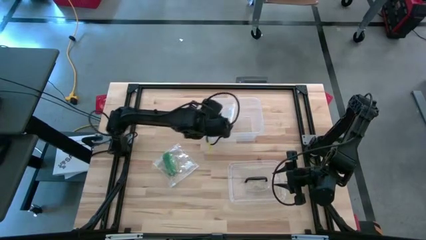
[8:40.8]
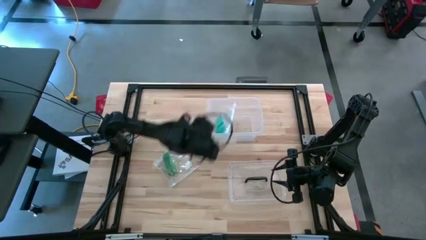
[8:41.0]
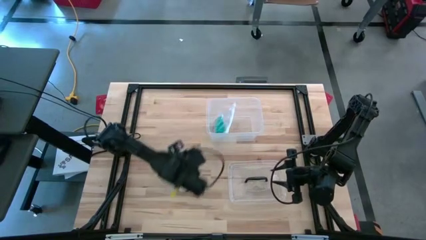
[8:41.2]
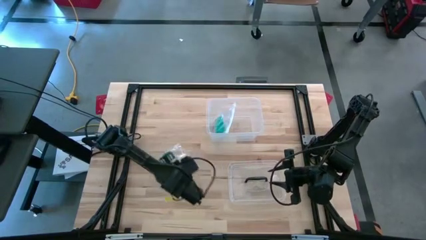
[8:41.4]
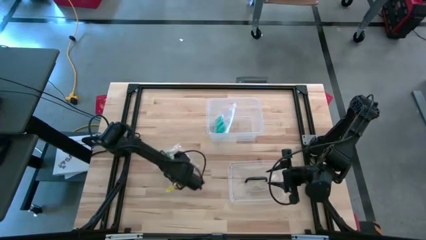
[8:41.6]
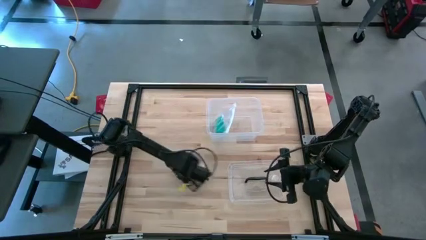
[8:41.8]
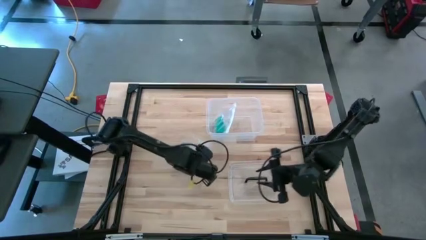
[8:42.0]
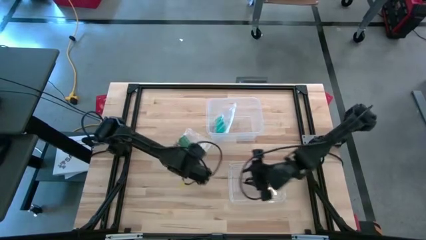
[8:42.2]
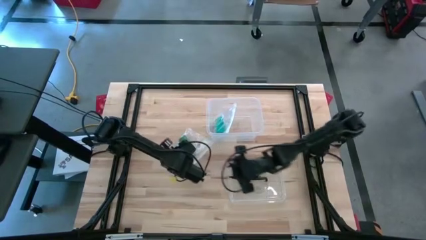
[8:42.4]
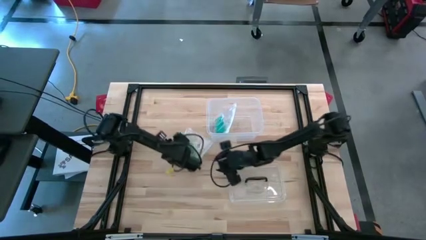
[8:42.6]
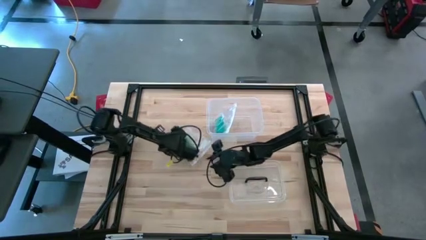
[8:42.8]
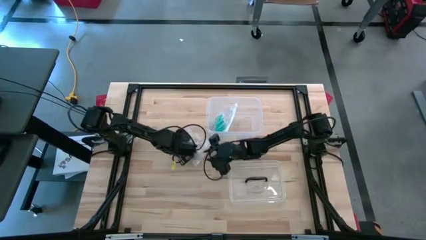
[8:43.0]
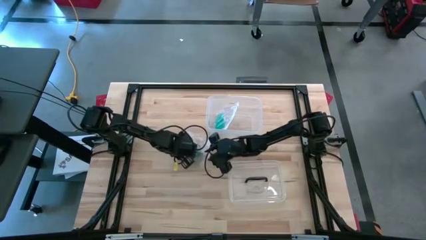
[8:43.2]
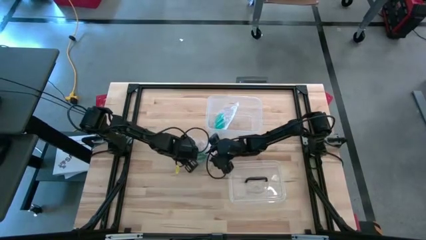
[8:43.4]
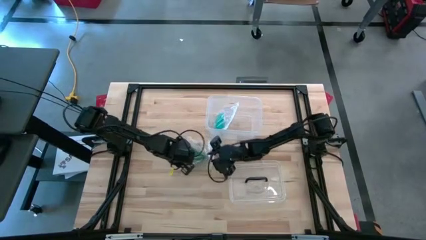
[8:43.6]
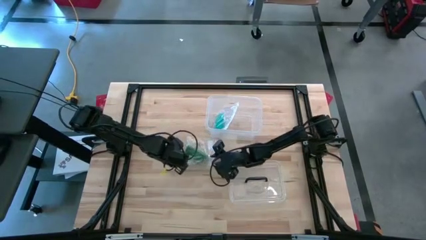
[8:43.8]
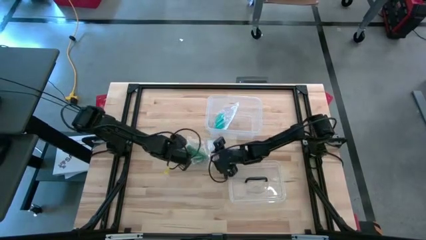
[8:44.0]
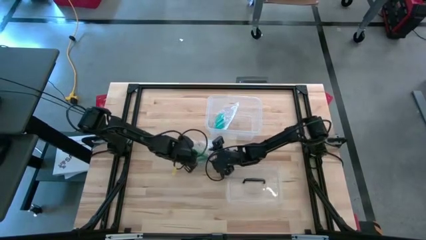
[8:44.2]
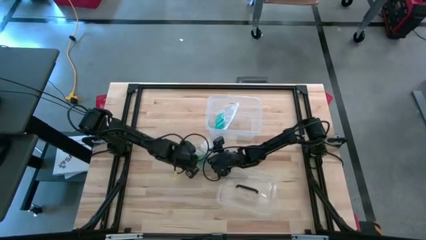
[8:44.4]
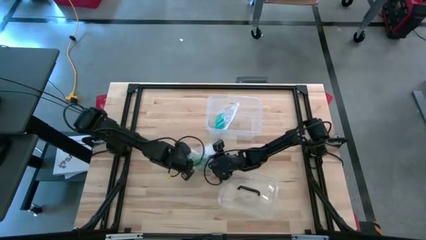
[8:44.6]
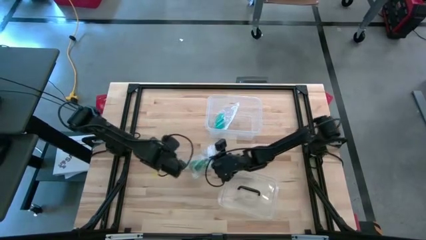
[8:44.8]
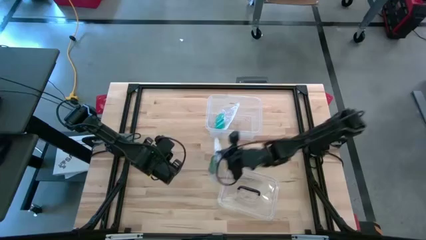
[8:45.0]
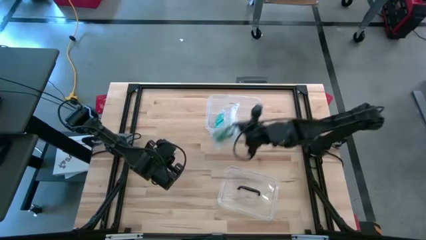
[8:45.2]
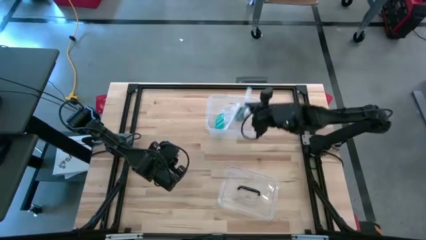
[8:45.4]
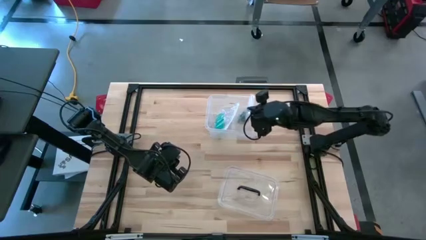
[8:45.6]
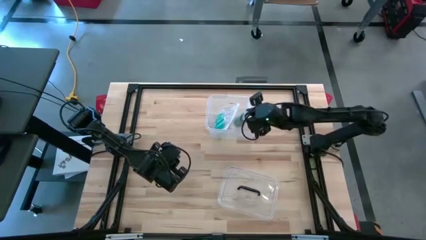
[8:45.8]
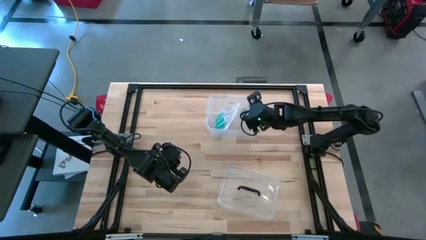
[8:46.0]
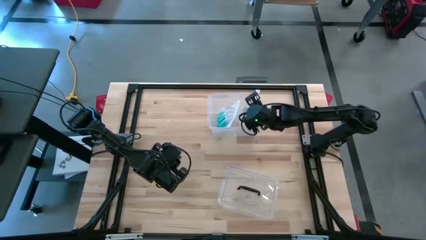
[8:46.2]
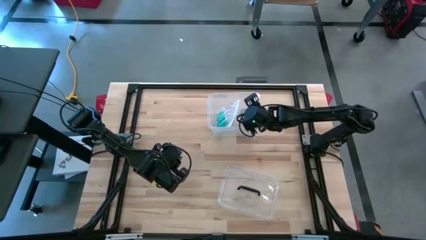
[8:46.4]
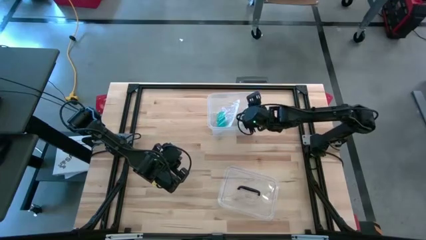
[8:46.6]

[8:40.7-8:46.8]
Task: Roll bandage
Put the packaged green bandage into the transparent bin

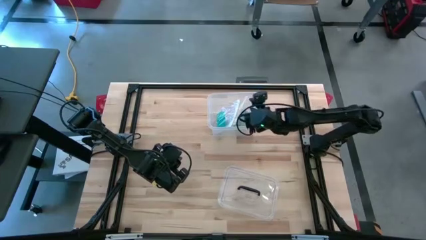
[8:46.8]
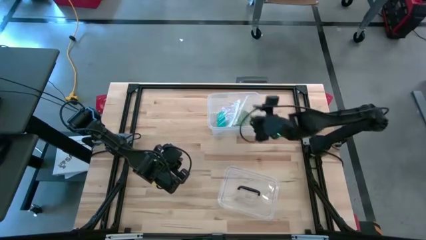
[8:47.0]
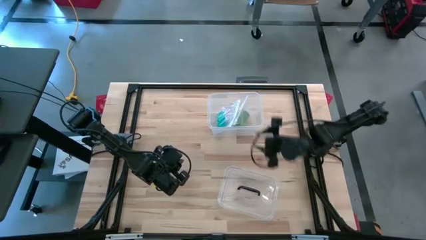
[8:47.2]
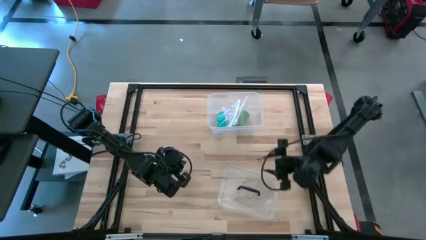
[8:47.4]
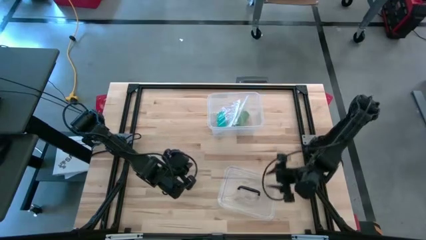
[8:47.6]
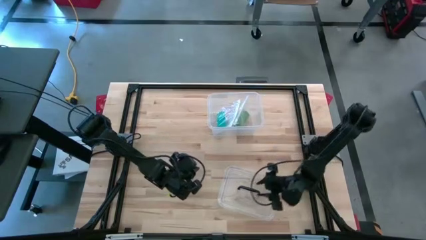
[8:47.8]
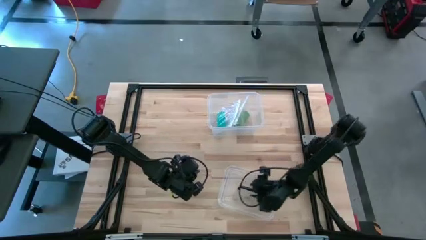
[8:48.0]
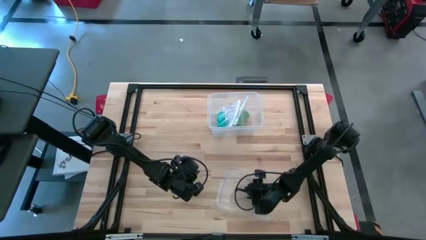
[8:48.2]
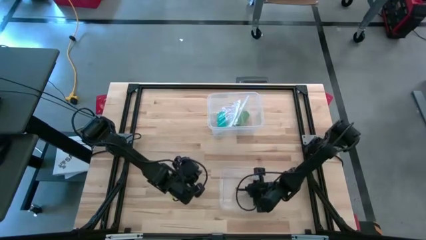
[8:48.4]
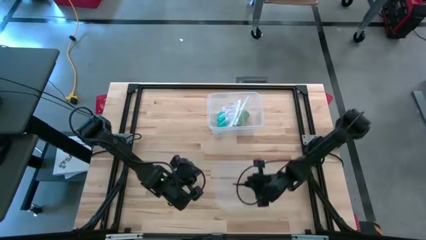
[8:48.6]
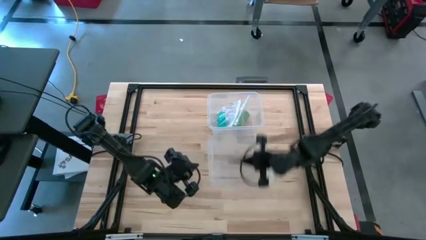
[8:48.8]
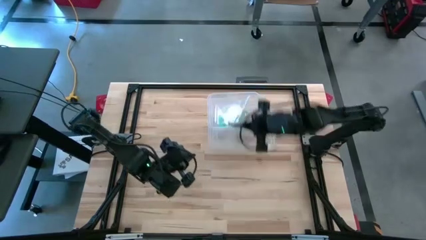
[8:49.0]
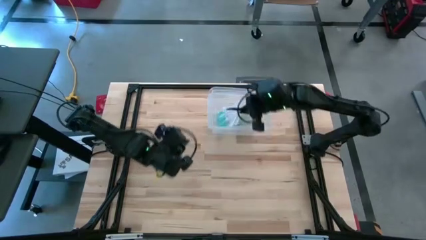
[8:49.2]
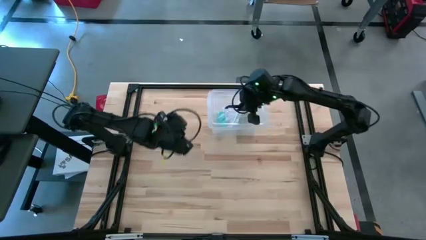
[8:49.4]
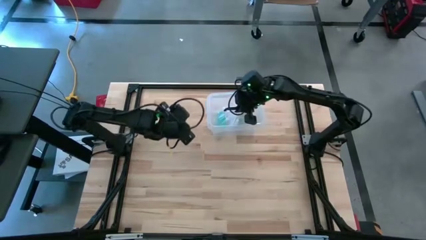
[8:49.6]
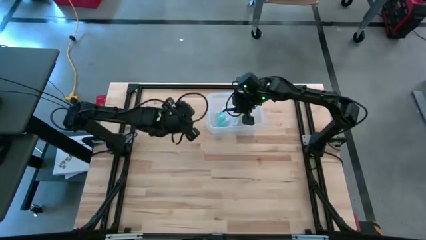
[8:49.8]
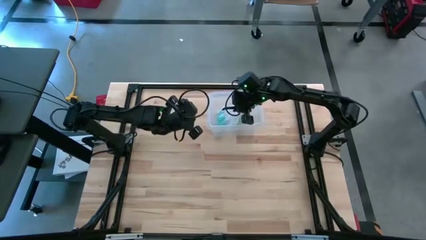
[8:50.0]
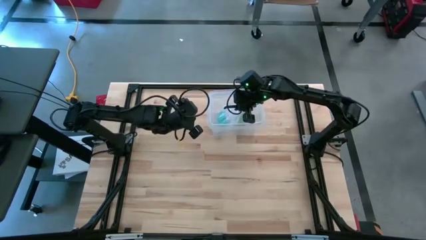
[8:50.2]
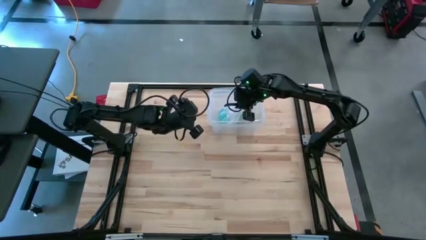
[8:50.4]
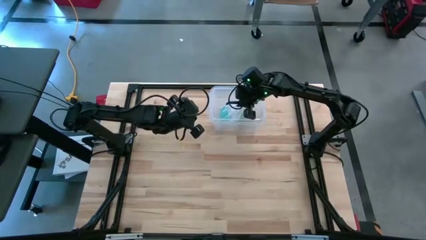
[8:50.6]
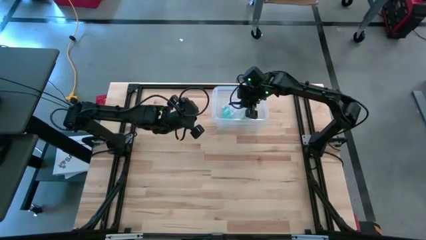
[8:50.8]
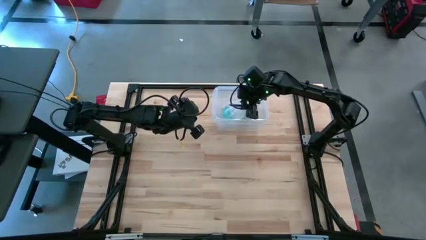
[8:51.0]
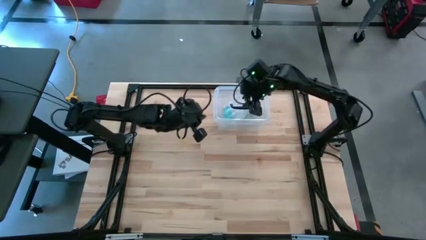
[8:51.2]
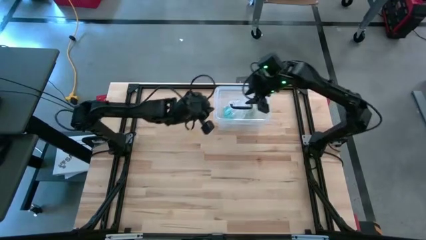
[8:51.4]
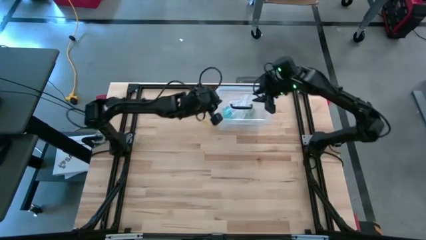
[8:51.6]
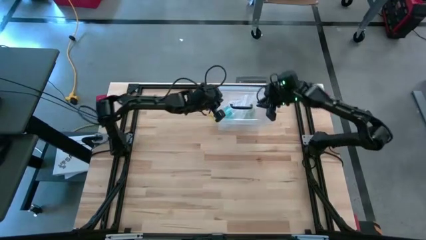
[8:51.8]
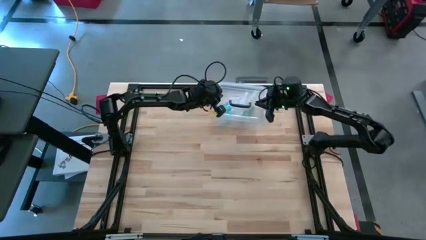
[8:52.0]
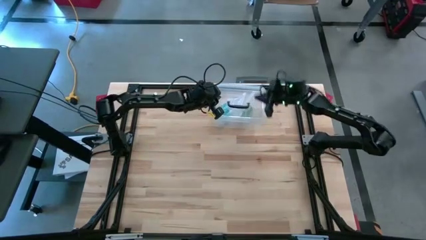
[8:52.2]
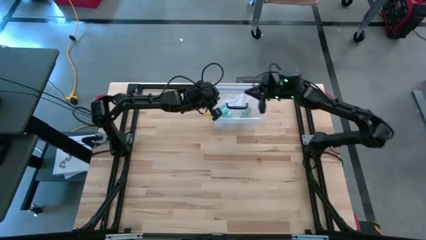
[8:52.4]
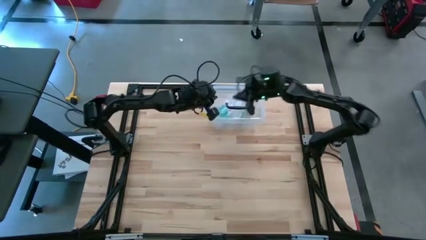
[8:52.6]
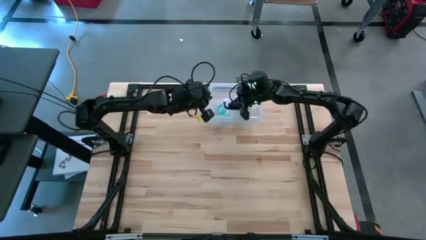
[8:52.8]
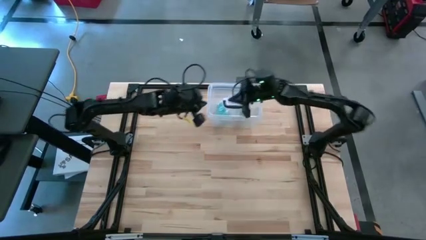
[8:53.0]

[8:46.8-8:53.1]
Close the transparent bin

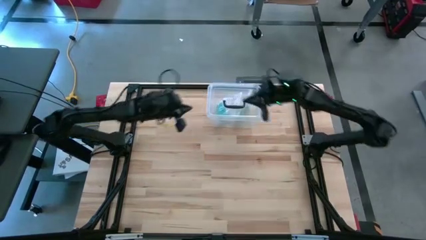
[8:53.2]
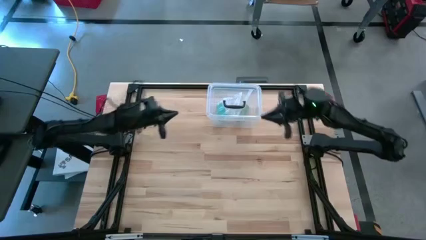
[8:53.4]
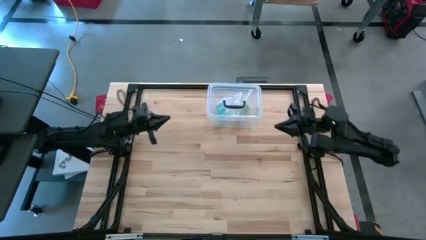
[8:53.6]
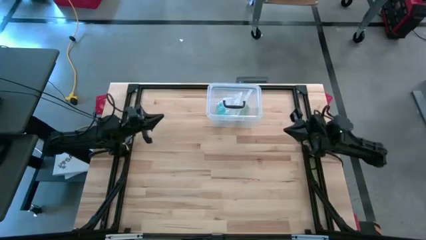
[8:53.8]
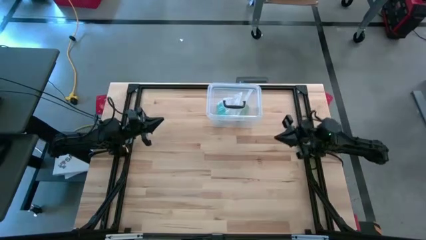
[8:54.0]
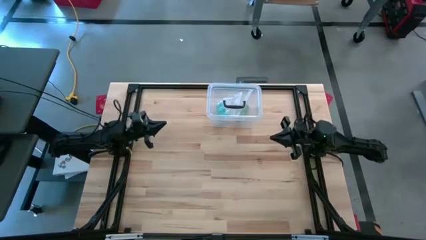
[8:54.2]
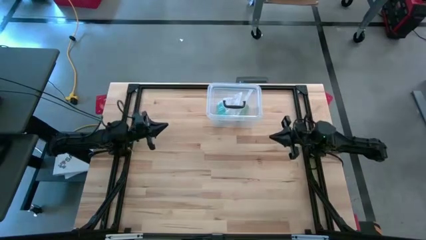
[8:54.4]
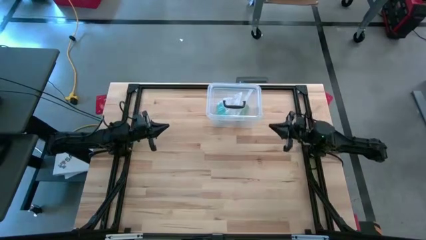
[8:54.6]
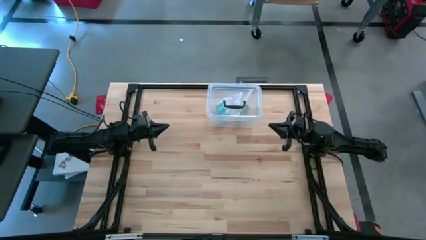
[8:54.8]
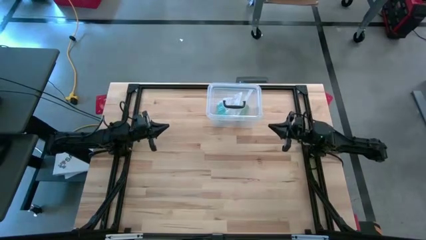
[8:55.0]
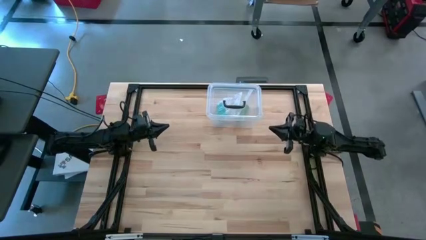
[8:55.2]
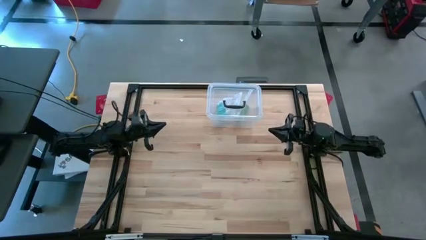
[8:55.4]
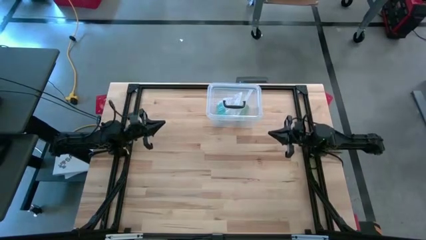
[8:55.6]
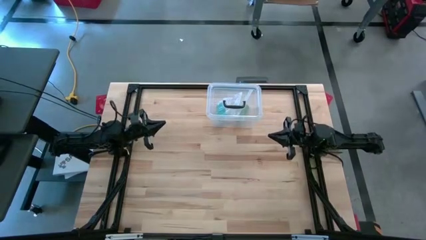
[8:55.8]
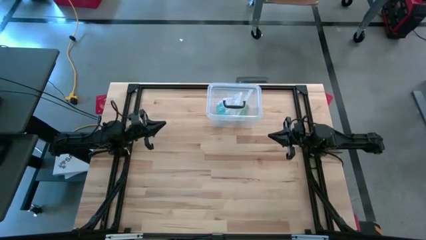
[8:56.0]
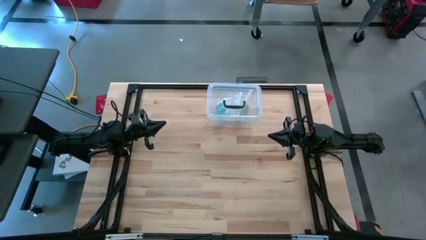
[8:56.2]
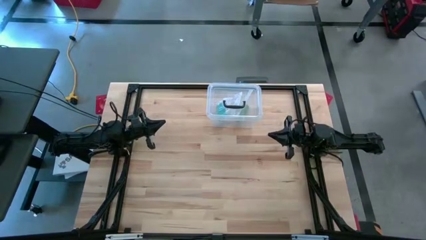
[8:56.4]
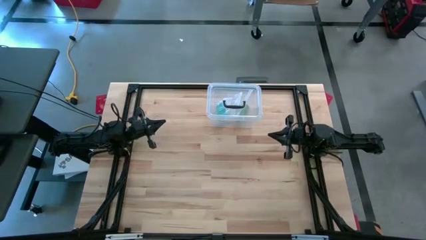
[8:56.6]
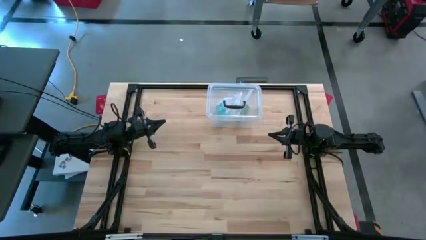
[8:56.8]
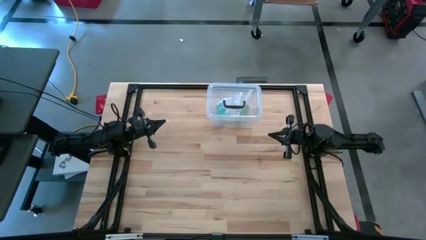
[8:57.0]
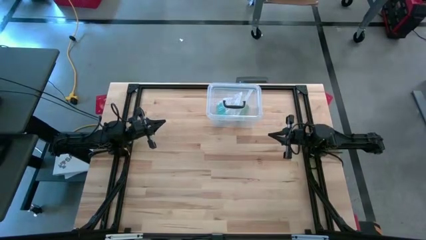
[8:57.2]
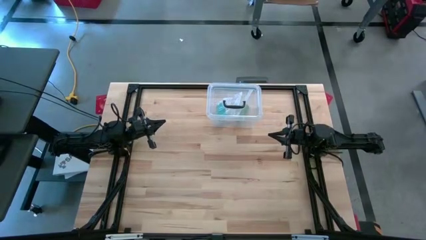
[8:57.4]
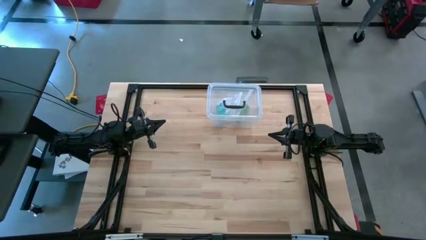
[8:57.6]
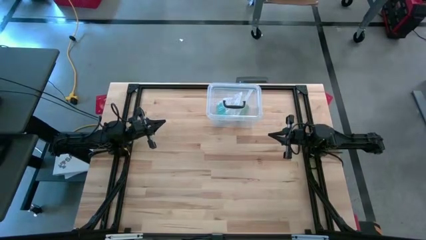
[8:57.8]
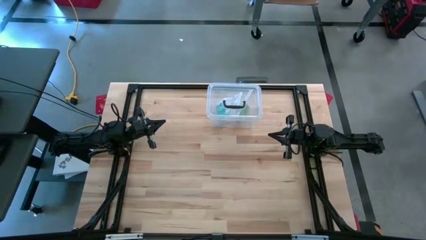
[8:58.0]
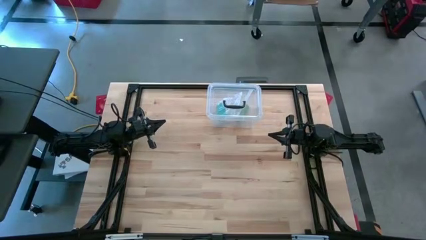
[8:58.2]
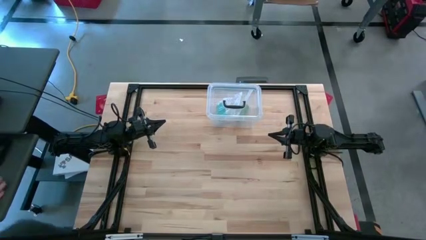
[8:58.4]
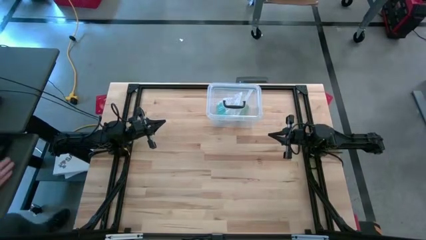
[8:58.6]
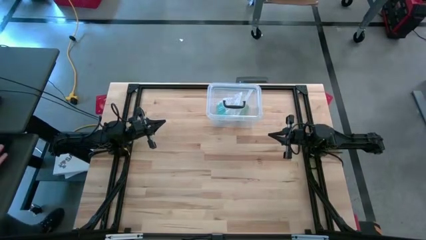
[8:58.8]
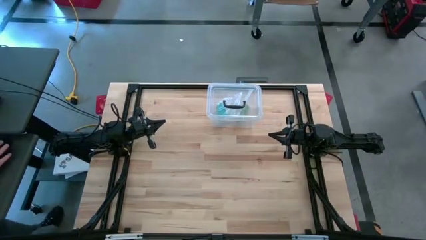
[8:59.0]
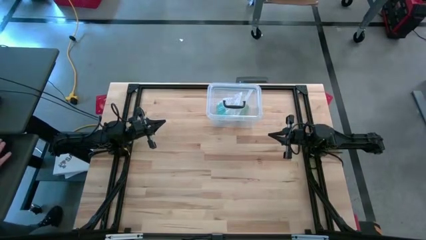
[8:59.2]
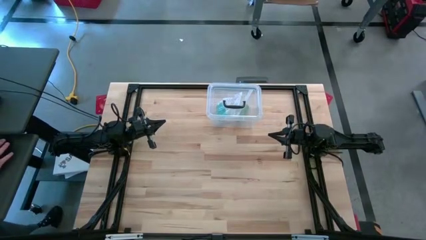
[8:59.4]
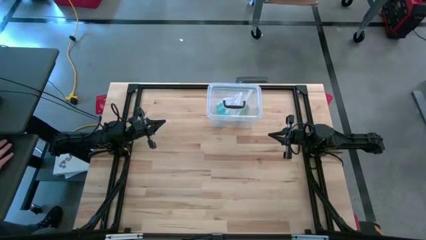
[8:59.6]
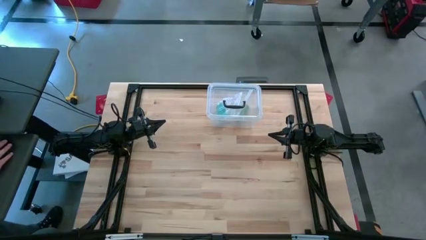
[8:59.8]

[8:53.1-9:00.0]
Return to Home Position
